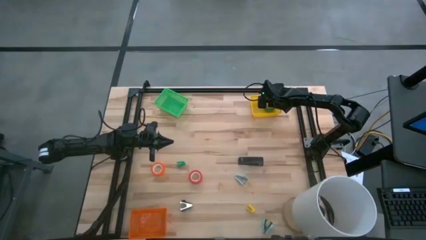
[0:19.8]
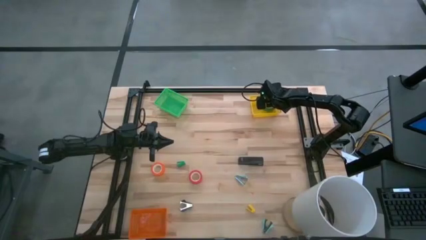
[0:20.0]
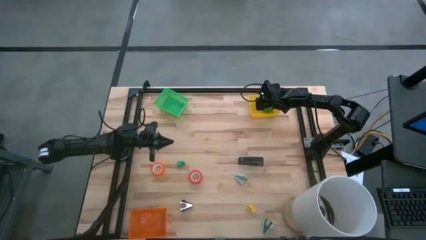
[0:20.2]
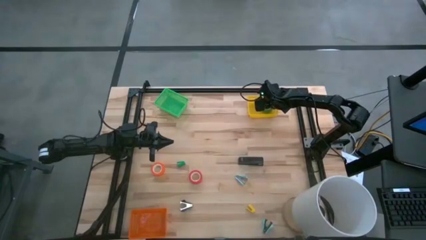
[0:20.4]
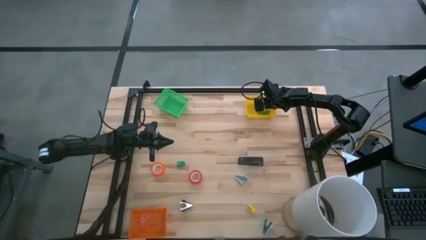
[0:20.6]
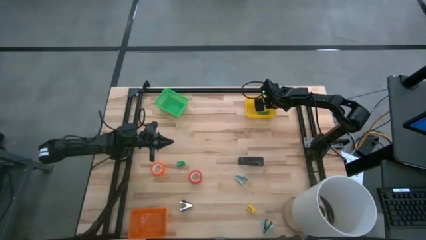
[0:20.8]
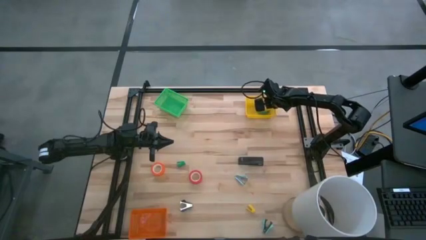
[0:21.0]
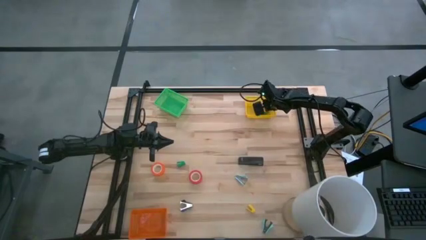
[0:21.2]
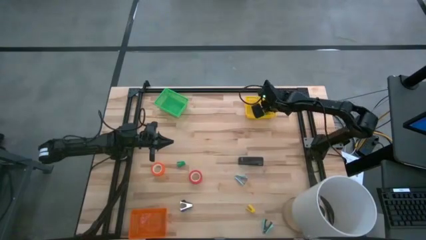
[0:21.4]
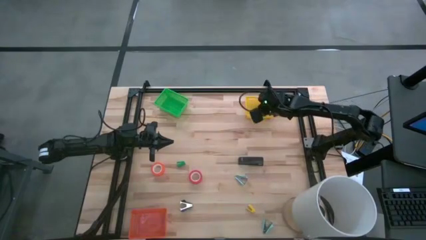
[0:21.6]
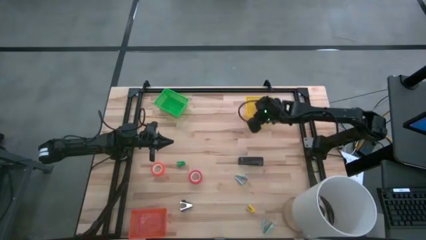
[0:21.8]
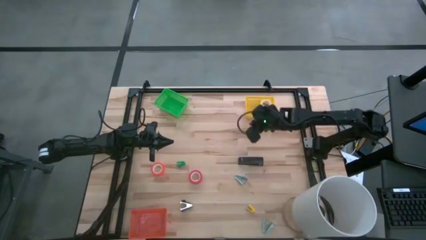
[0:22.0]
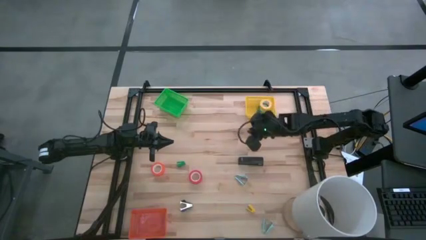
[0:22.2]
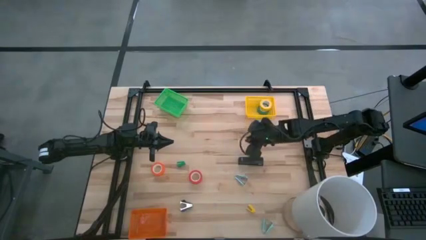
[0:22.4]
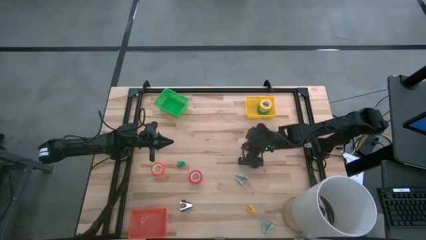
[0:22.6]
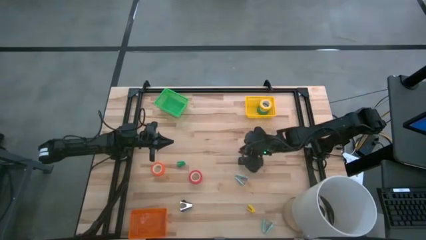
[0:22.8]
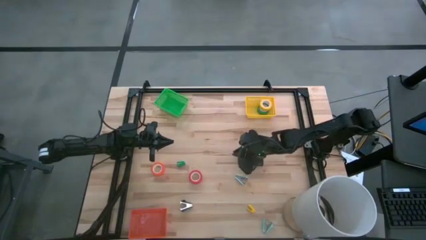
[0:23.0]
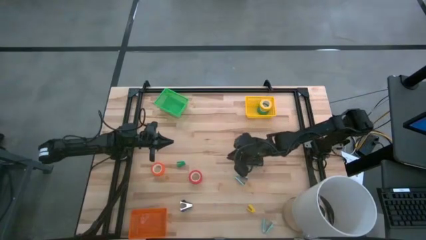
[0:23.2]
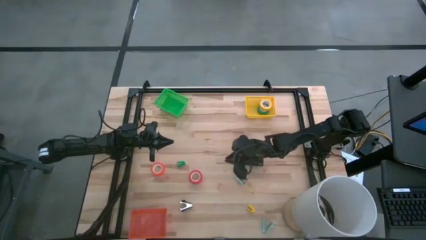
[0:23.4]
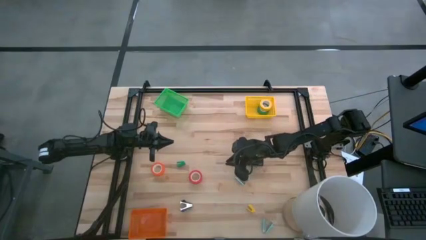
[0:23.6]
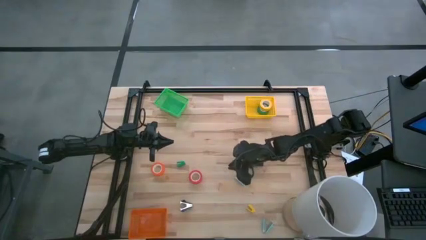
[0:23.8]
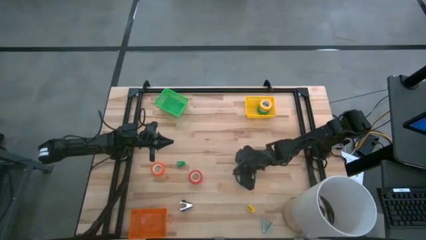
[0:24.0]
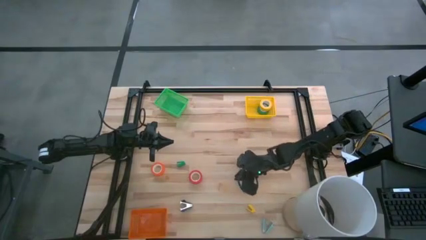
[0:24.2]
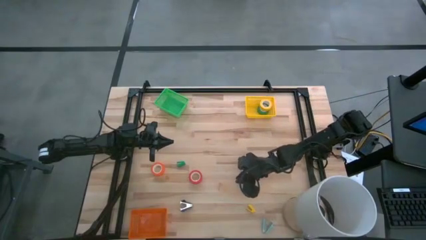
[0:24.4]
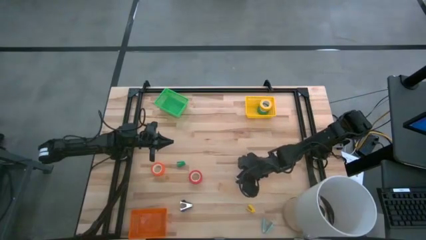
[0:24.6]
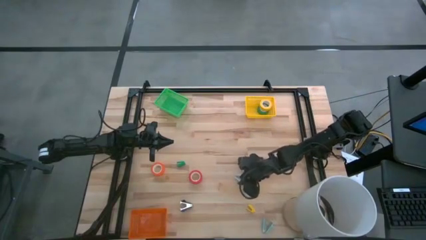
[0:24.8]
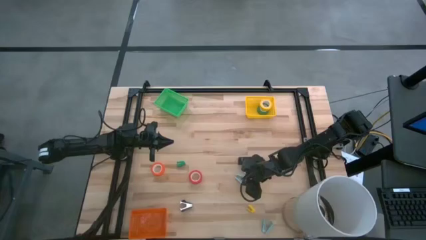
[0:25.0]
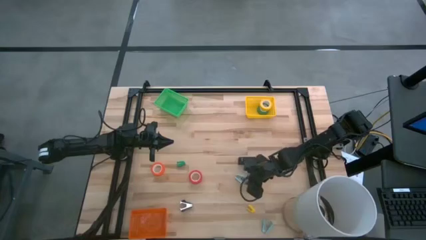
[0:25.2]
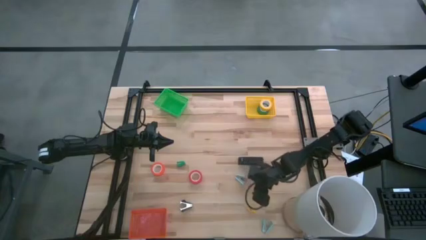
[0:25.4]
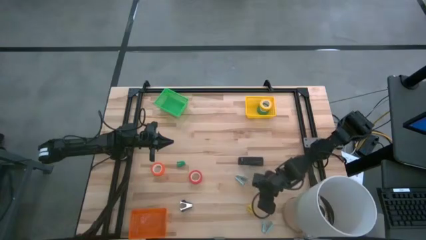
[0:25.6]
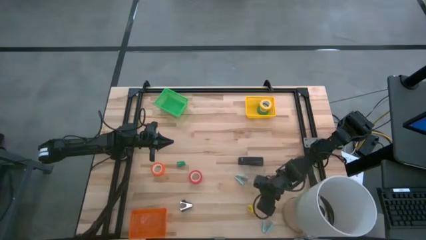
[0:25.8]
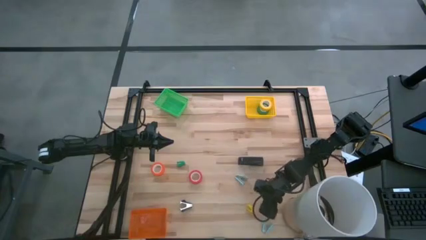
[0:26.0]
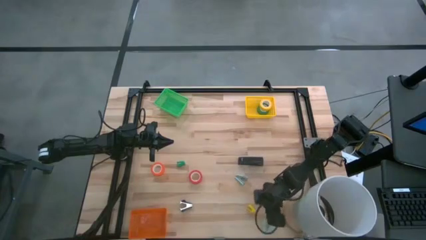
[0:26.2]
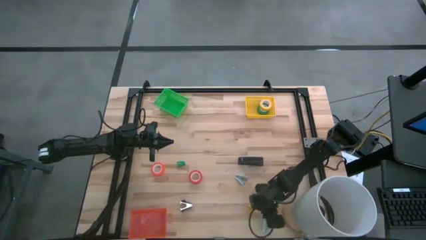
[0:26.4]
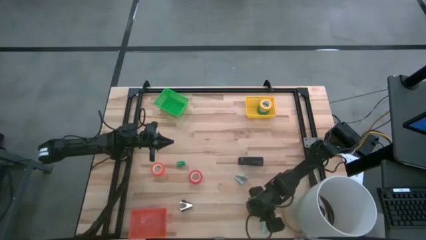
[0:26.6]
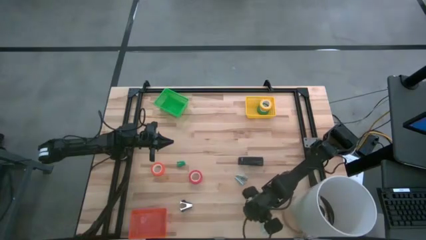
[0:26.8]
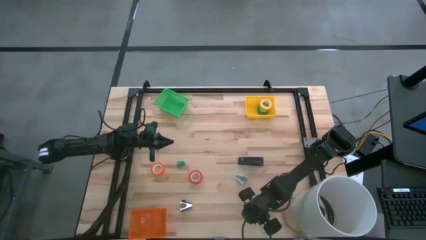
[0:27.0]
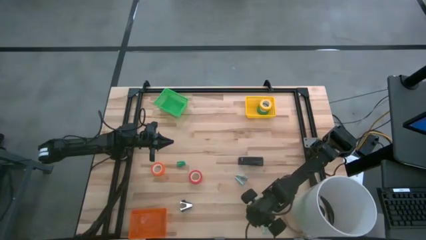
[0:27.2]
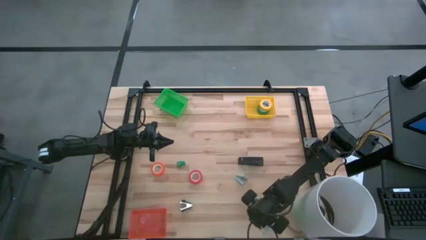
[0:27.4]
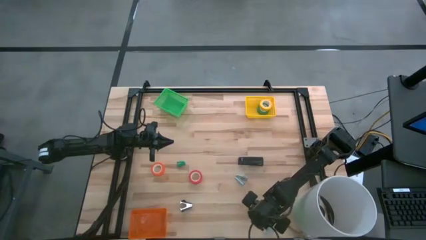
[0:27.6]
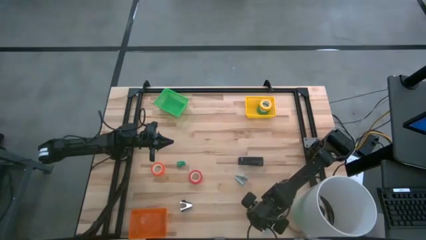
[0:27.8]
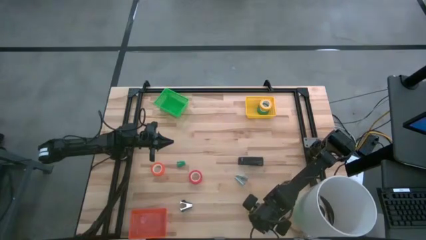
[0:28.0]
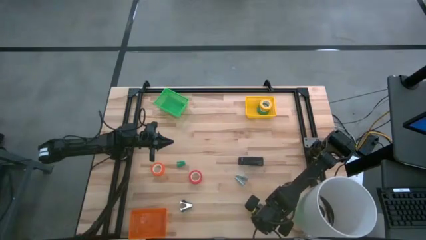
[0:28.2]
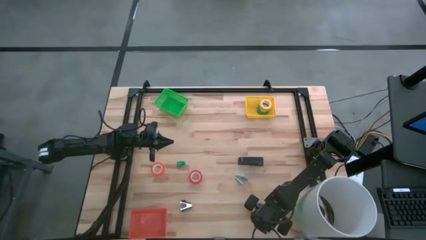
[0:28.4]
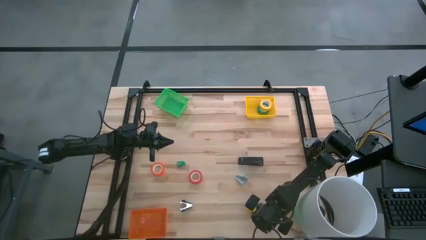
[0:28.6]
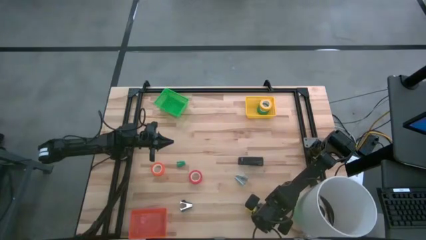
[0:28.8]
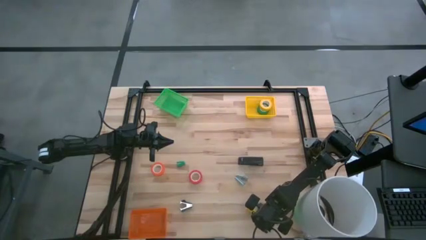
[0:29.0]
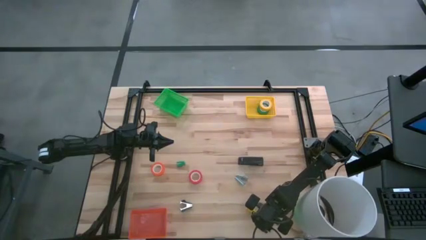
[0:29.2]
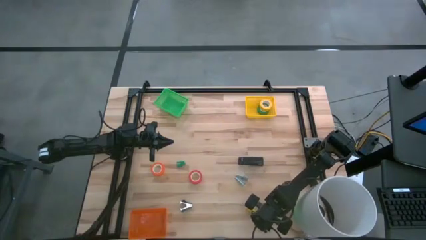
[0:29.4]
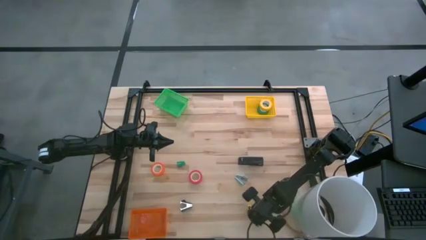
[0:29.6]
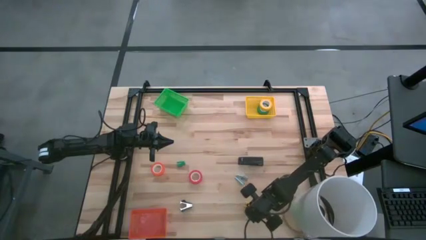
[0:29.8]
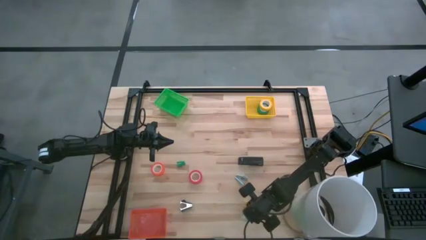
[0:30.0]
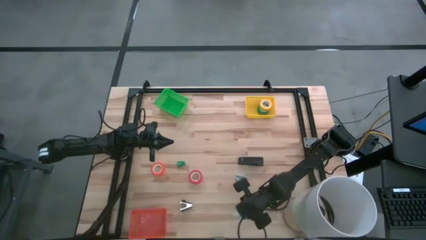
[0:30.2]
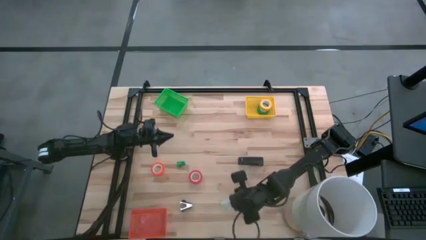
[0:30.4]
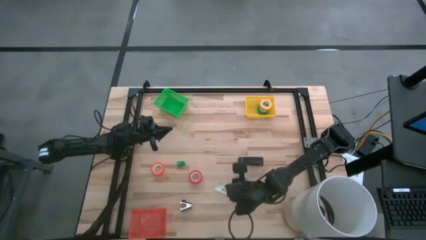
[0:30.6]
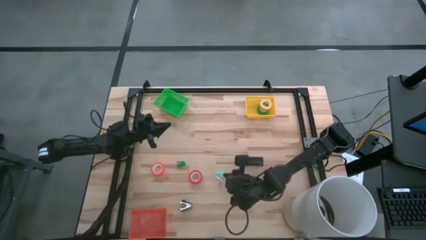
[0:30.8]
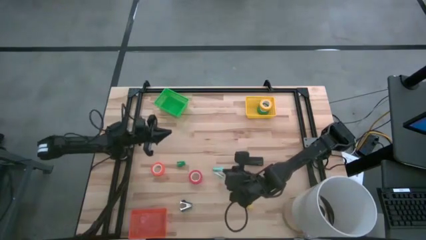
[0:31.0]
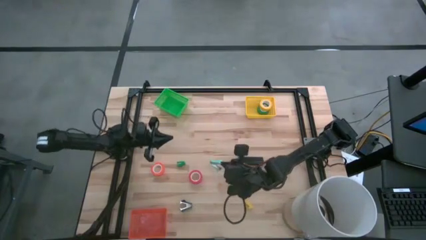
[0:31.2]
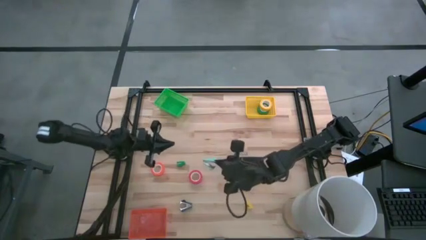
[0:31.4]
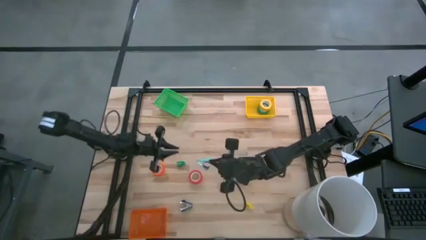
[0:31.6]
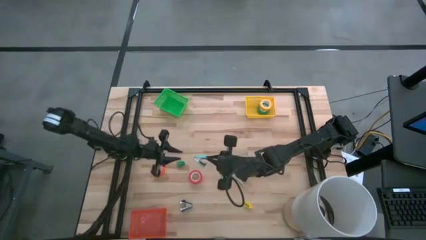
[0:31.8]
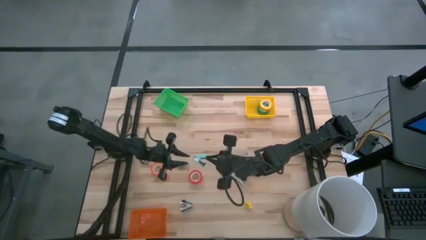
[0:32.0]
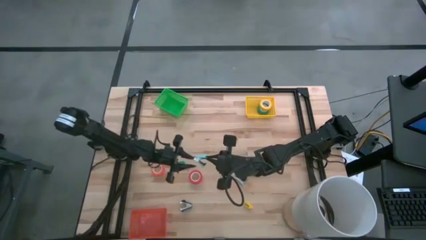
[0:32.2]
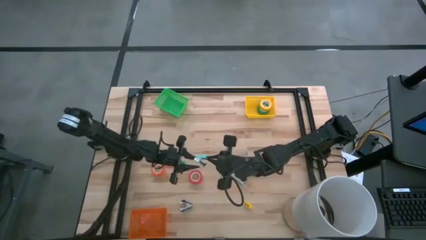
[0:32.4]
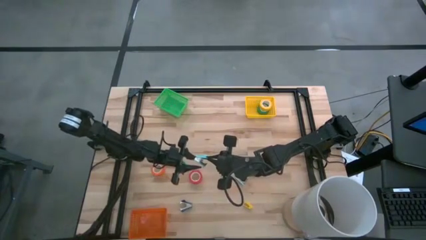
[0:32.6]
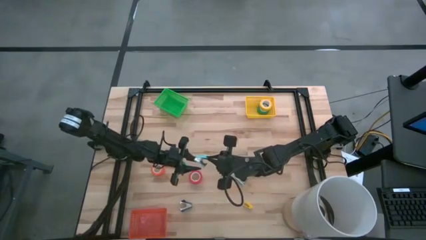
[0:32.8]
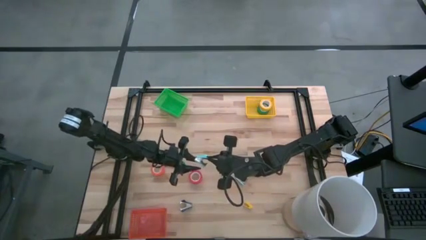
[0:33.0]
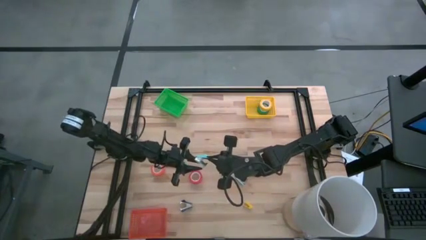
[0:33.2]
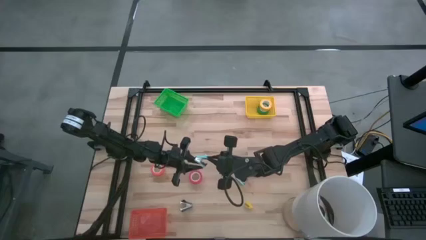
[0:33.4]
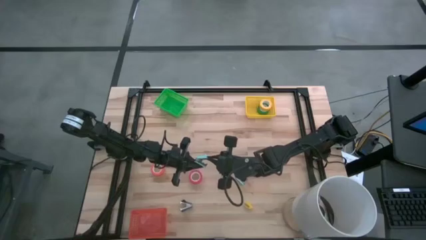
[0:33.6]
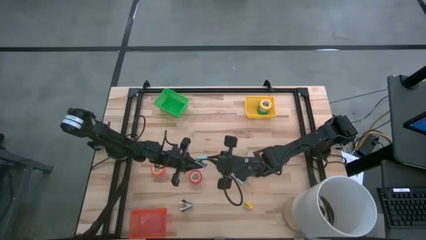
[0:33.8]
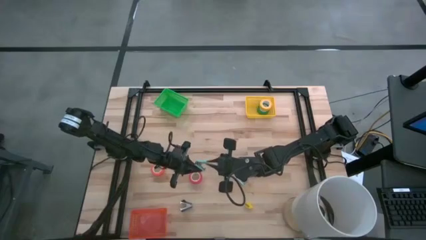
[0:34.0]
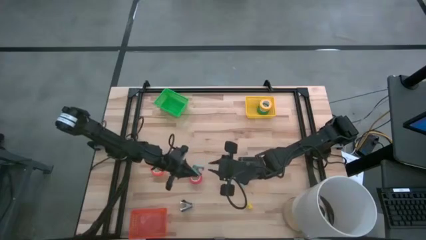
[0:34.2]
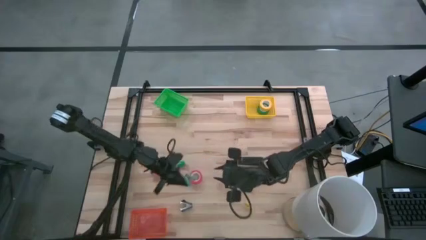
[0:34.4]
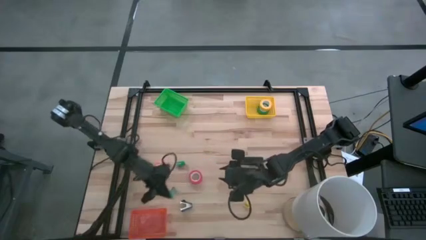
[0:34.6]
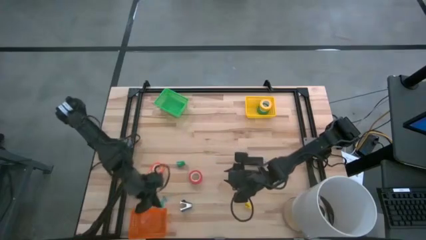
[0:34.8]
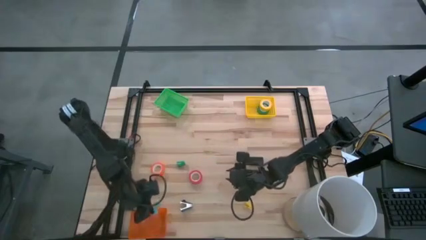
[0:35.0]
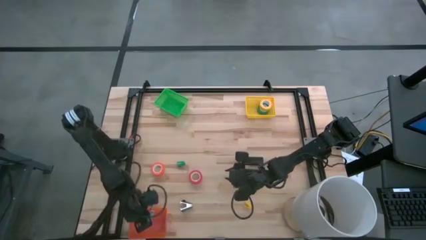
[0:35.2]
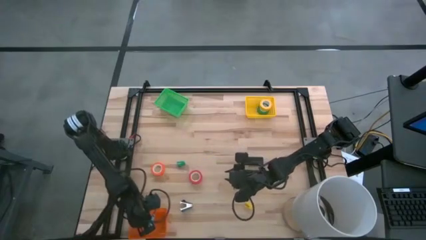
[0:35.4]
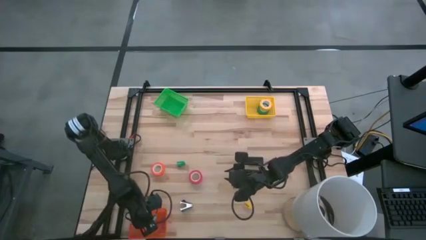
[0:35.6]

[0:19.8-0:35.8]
Task: Pick and place Stapler, Stapler remover, tape
Put the bottom blue staple remover into the orange bin

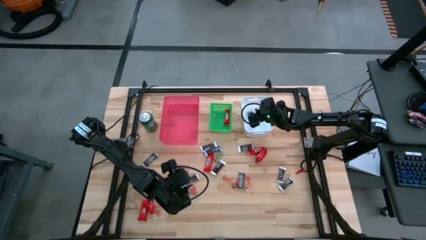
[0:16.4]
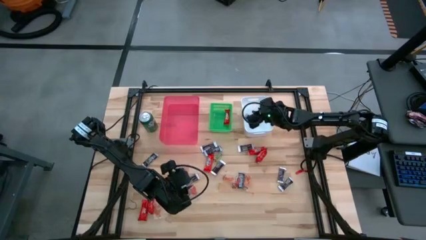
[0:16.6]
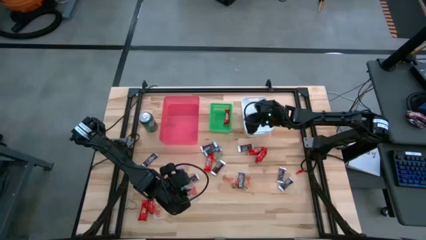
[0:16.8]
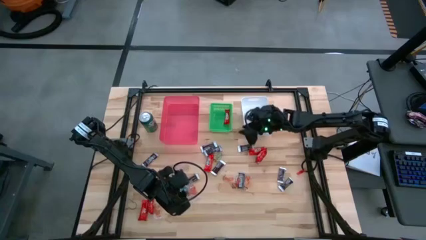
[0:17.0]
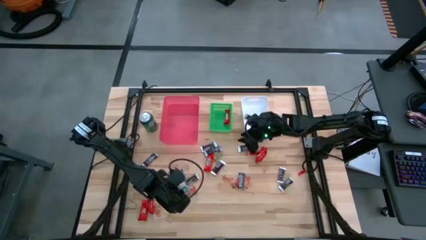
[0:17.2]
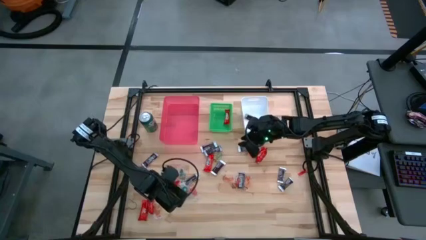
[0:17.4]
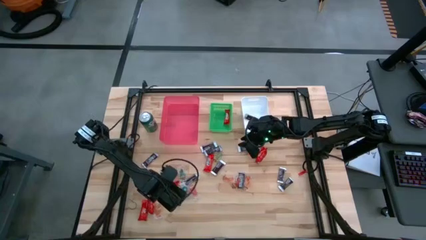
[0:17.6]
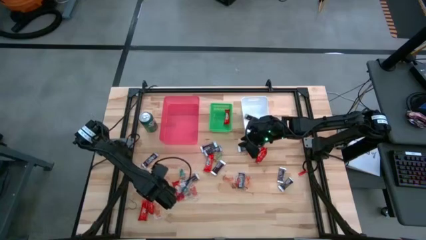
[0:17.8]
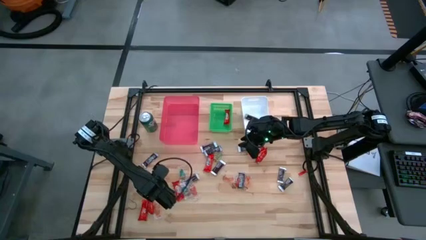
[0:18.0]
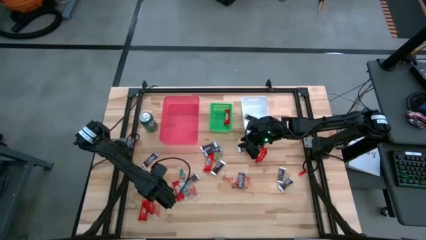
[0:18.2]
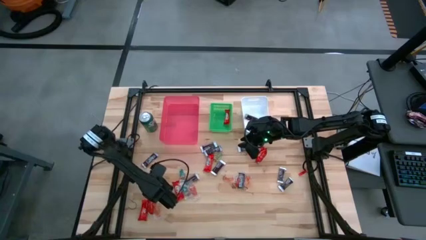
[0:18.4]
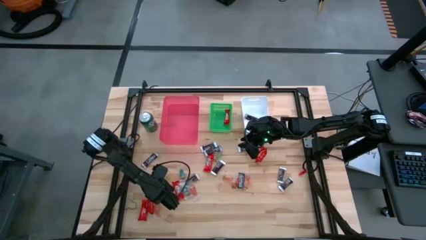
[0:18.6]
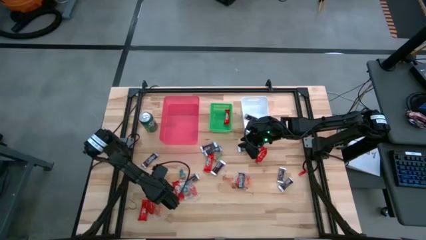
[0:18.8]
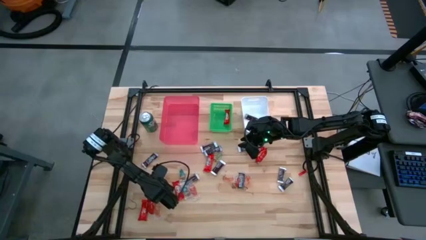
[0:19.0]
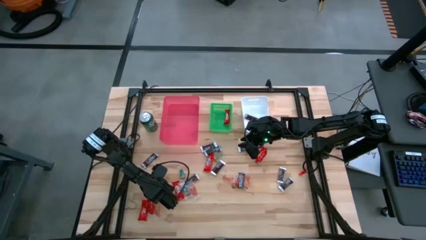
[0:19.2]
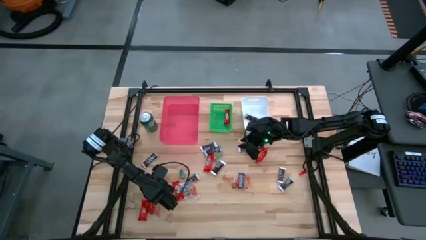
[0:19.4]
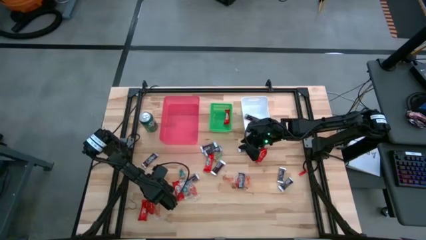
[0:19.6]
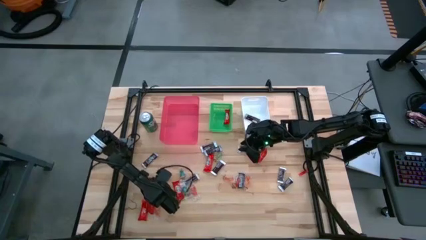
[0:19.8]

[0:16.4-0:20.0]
Task: Sort candy
Put the red chocolate into the green bin
